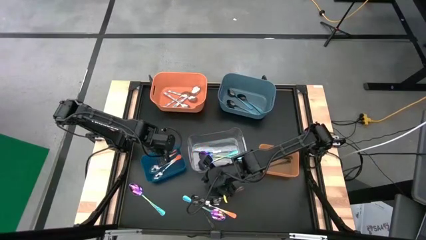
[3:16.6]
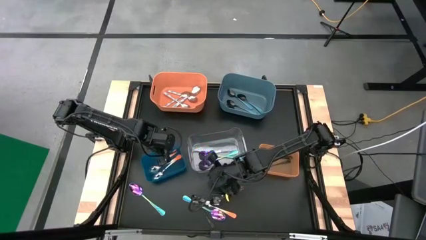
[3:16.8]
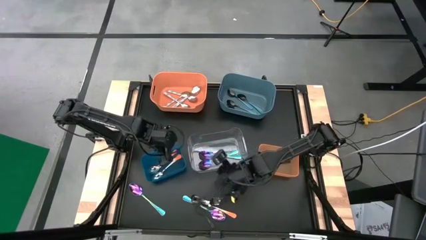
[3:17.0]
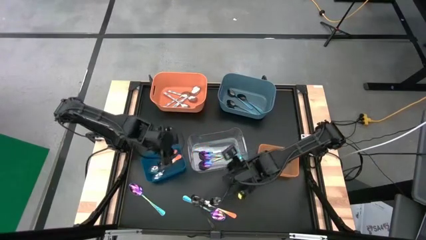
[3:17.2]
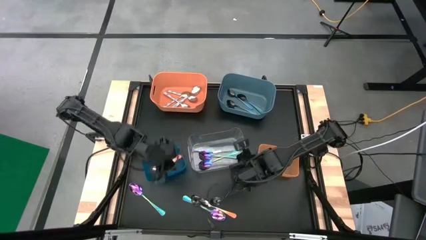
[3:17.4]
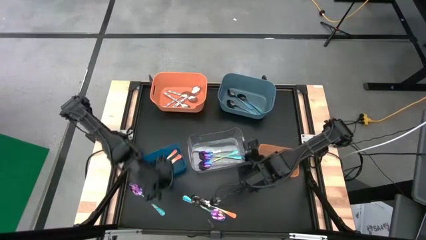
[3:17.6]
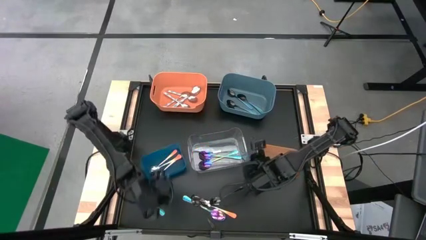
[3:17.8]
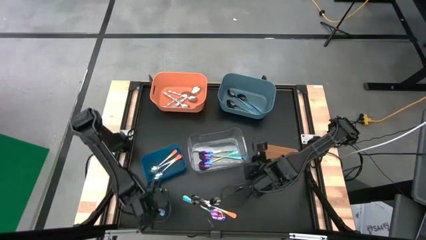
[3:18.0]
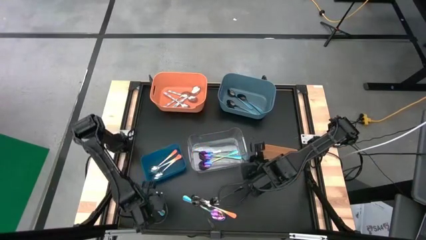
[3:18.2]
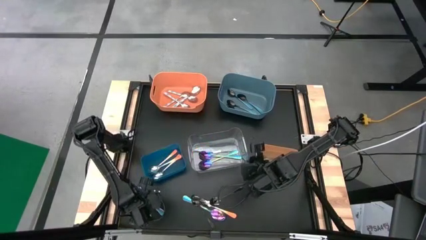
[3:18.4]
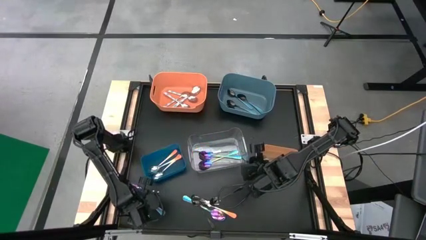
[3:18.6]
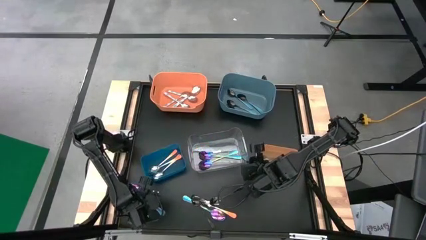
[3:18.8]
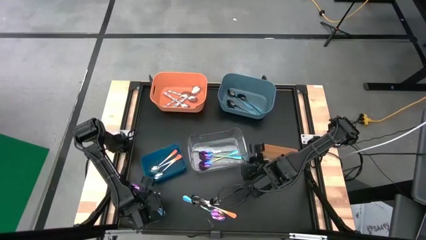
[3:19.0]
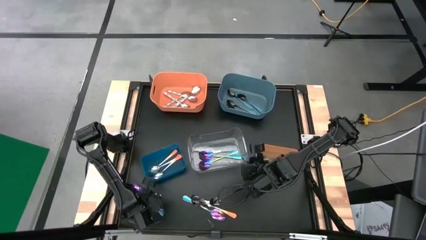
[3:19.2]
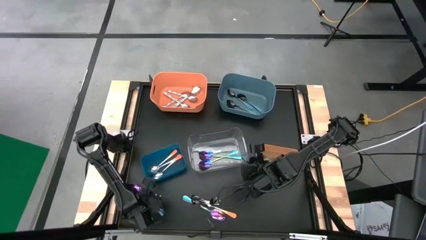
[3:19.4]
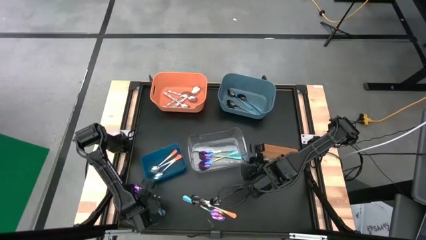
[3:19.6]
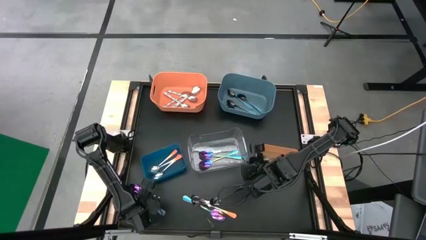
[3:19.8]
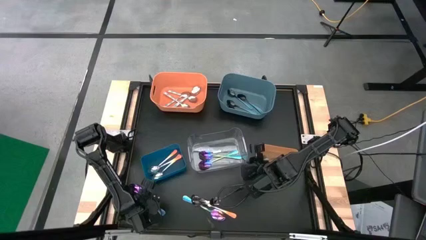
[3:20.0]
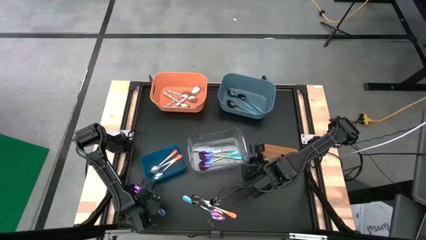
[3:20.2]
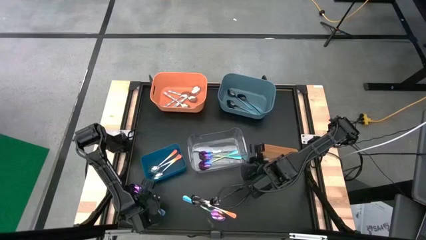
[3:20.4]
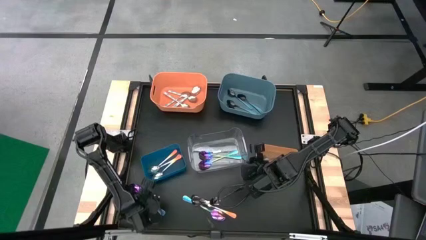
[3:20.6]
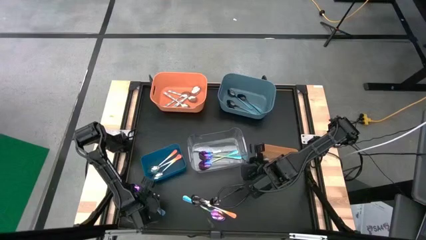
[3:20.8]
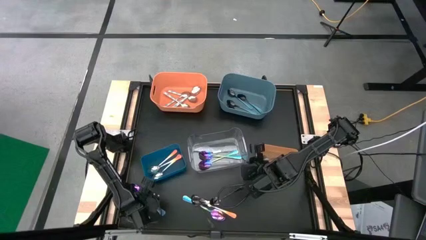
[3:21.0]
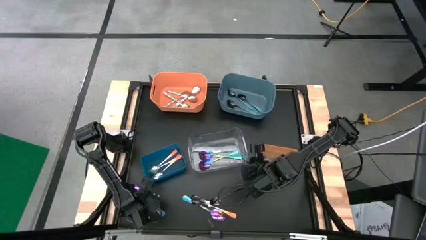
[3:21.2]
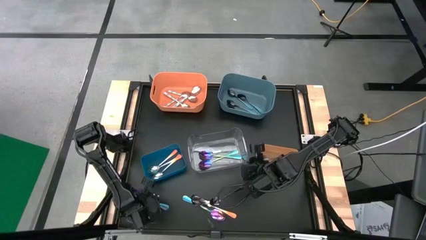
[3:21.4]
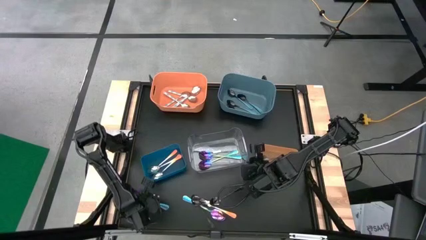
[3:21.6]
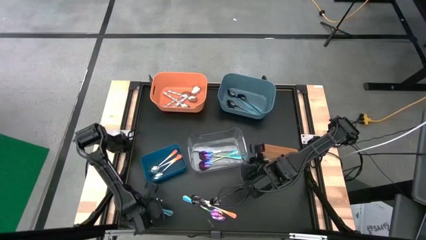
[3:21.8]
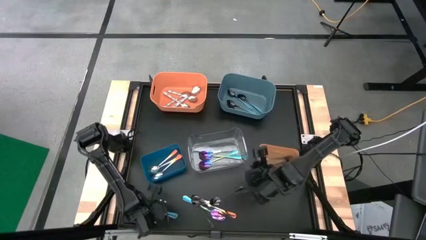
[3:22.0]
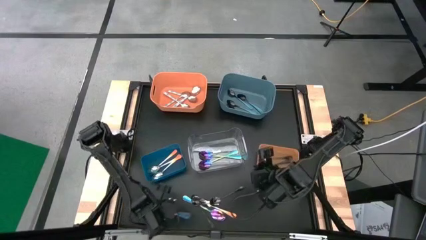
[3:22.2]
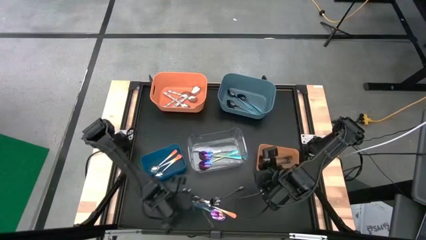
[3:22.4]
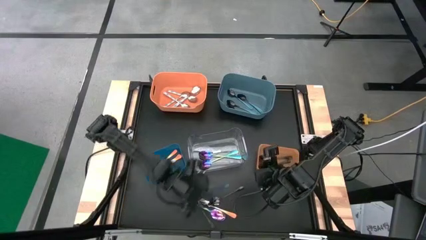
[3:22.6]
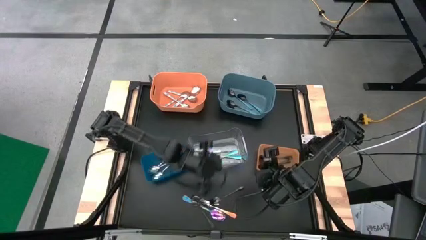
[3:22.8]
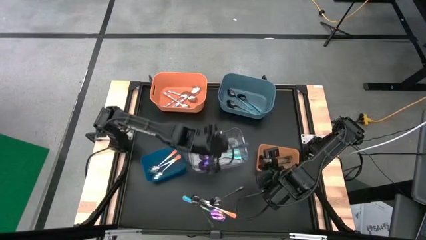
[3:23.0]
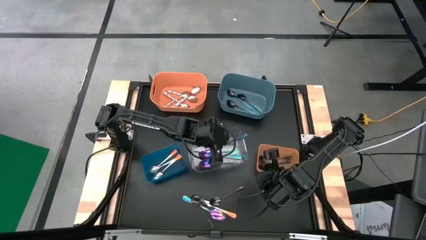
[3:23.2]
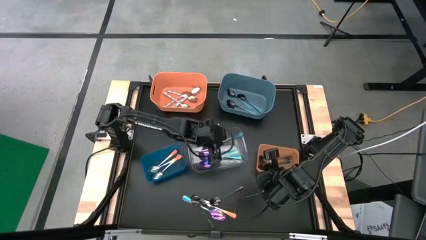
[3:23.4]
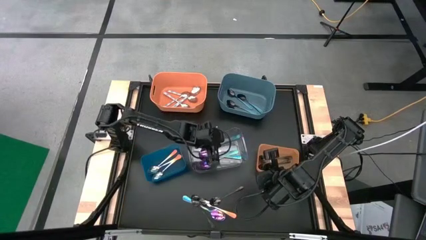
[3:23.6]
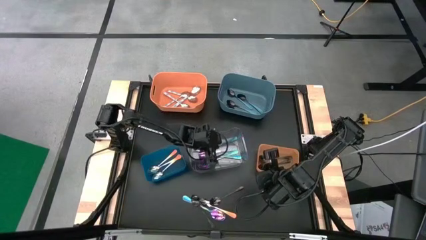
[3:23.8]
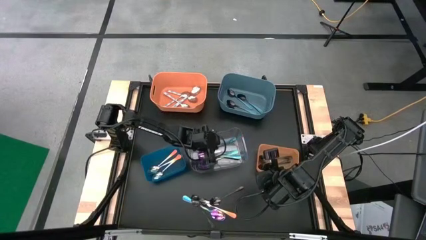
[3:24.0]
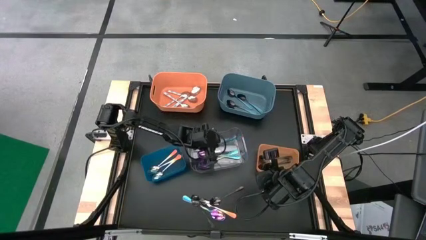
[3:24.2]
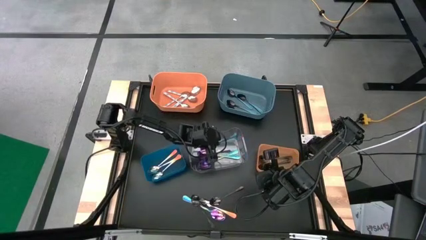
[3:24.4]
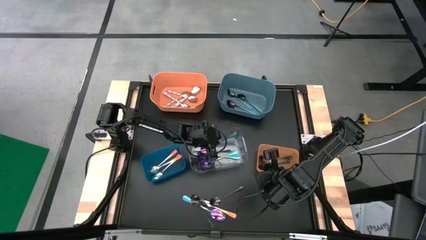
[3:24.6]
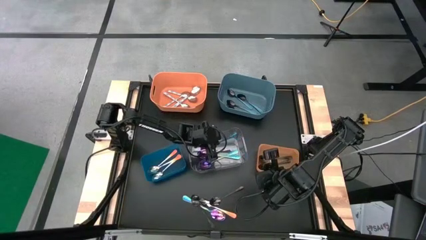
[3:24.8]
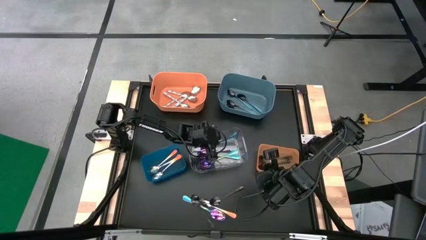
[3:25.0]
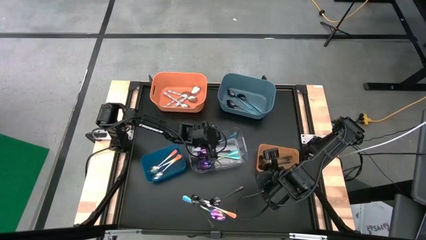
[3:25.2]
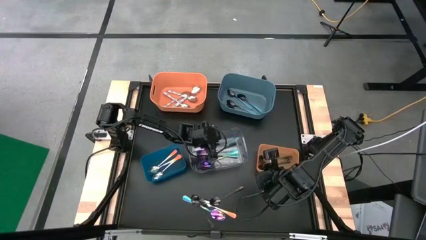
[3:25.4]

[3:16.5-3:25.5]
Task: Sort silverware by color (type)
Put the purple spoon into the transparent bin

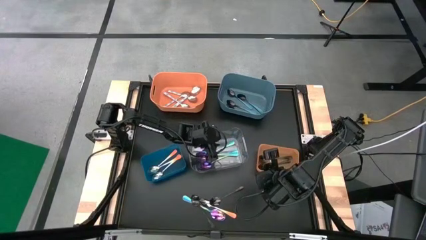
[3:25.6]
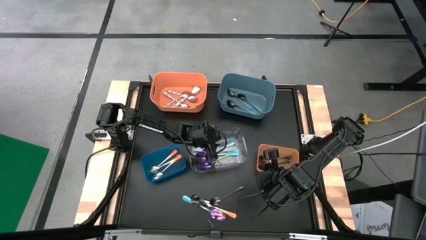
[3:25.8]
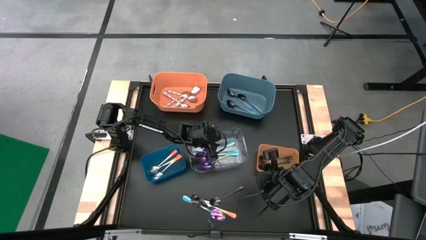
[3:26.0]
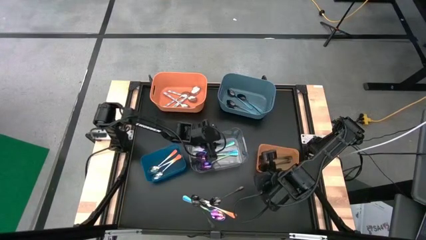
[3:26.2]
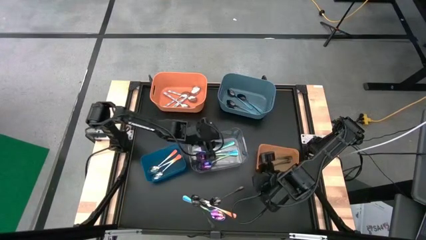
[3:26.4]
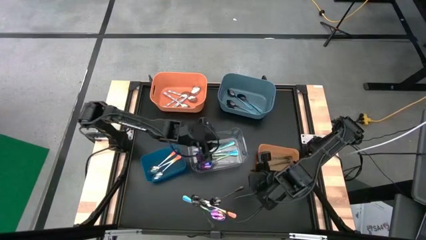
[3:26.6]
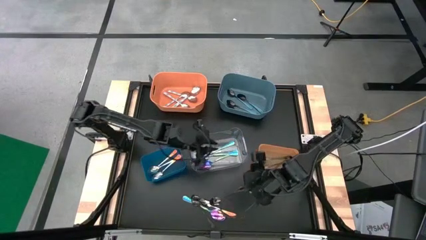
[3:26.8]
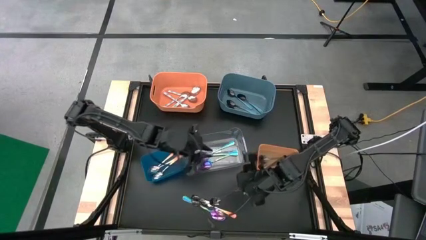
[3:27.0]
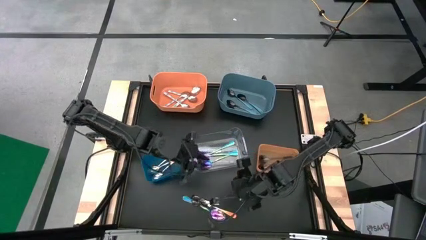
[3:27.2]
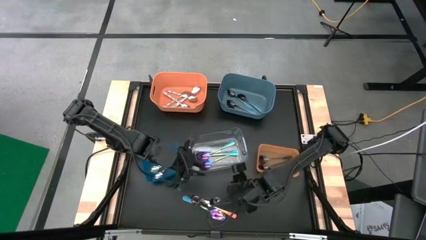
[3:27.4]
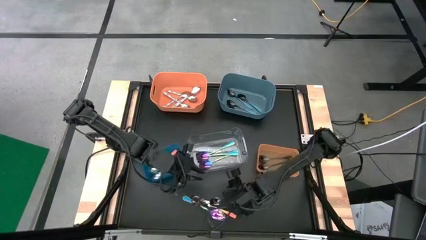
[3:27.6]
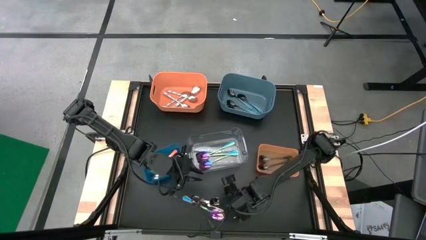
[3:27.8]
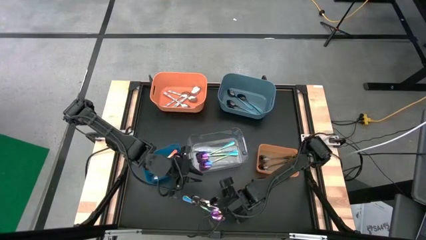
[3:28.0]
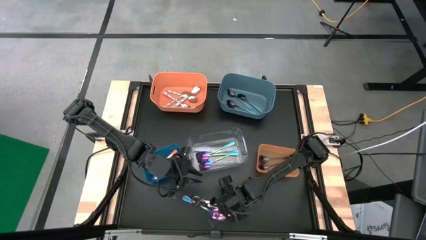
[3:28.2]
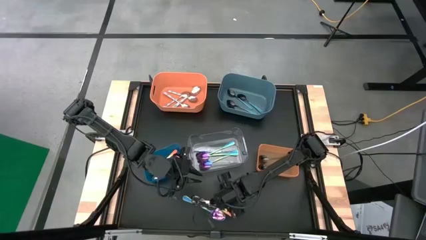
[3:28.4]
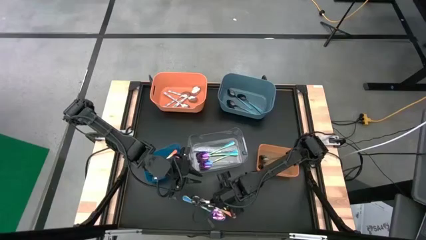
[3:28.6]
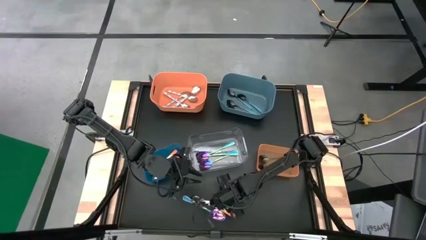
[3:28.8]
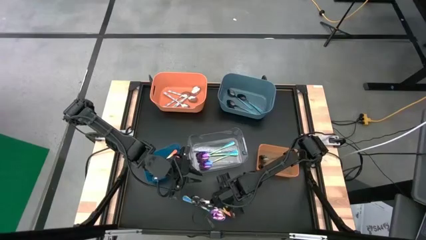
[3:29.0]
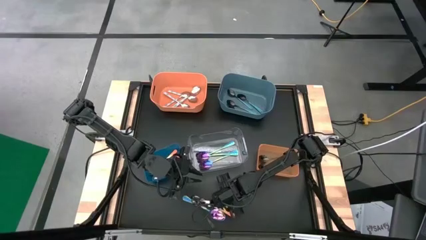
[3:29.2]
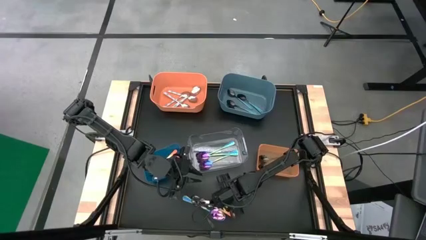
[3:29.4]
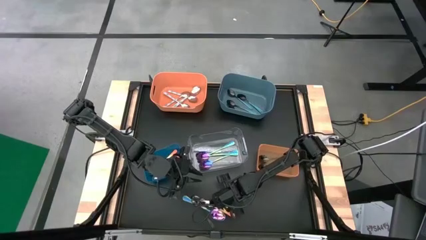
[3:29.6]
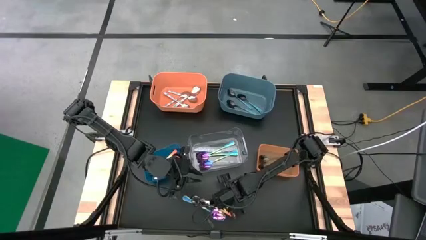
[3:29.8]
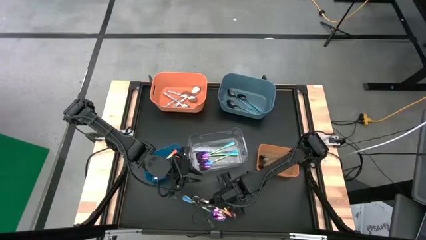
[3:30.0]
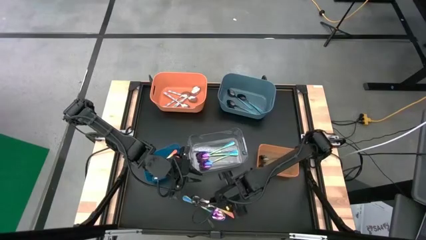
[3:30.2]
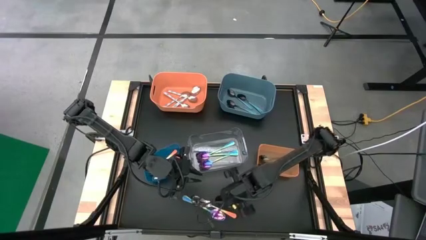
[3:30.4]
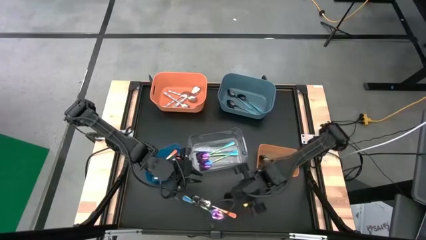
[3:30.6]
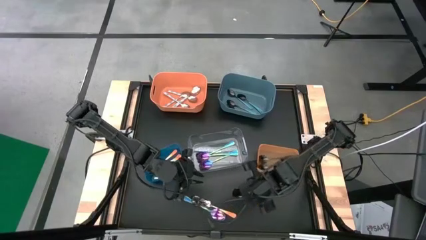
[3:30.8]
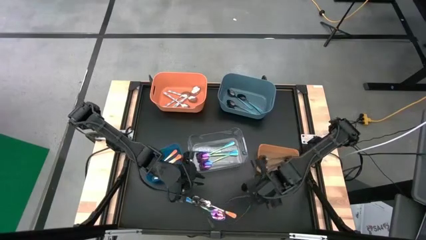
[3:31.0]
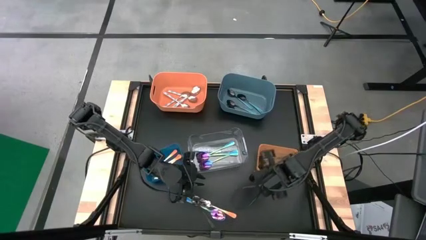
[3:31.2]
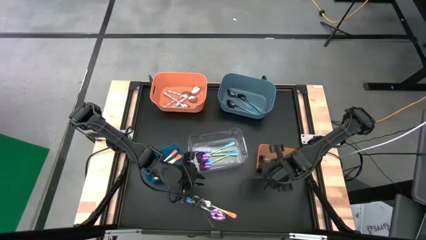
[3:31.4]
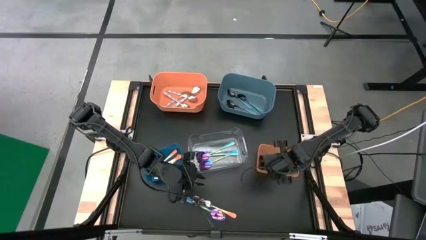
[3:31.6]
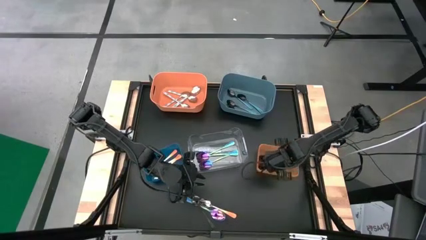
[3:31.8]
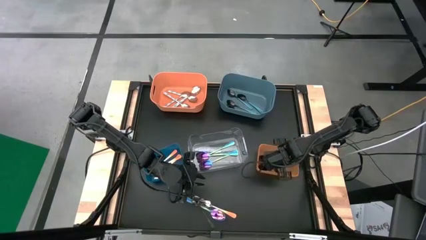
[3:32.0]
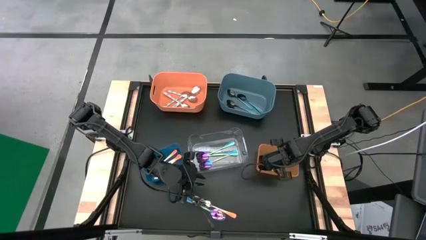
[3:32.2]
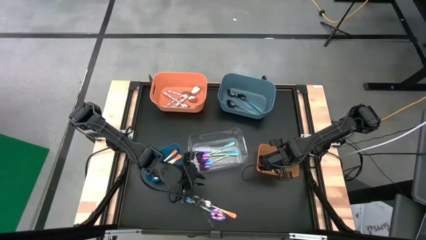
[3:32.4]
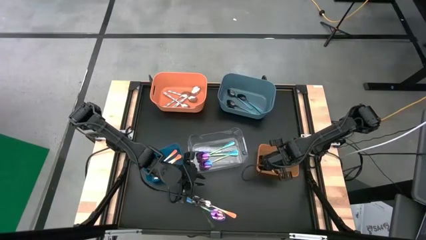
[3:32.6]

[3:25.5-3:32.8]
Put the black spoon into the light orange bin
